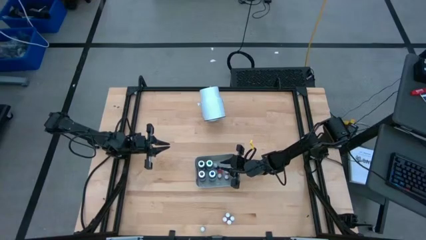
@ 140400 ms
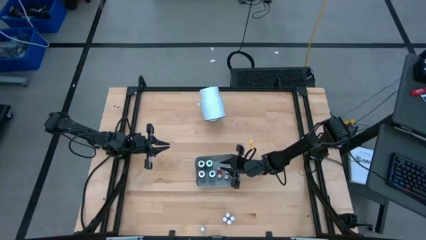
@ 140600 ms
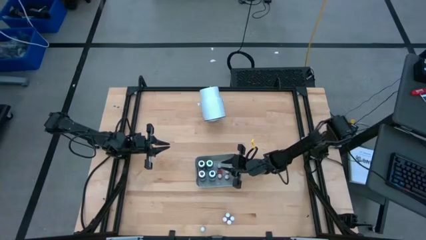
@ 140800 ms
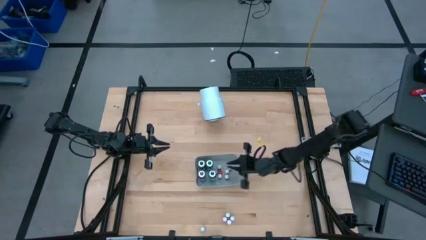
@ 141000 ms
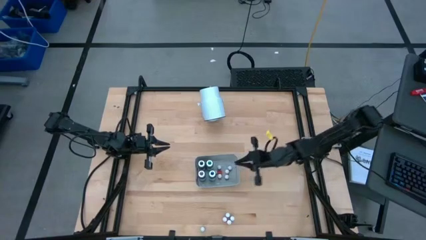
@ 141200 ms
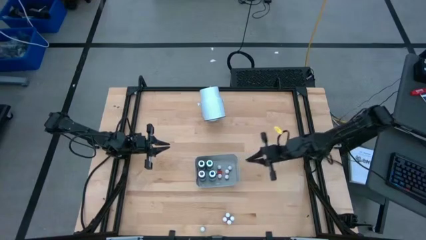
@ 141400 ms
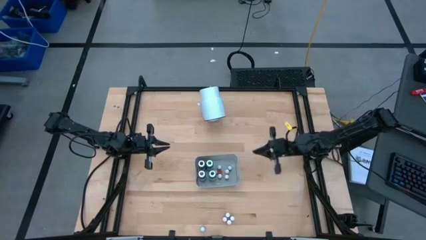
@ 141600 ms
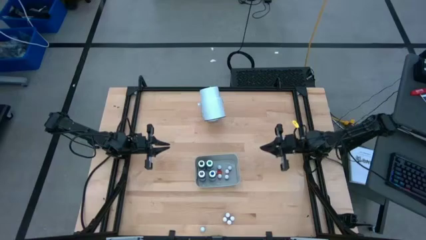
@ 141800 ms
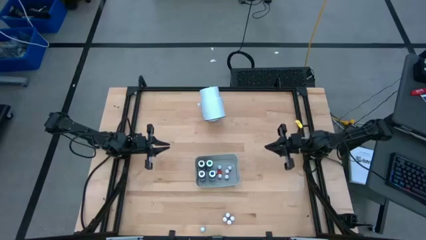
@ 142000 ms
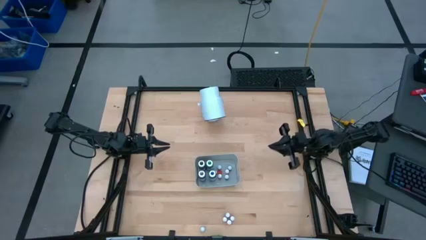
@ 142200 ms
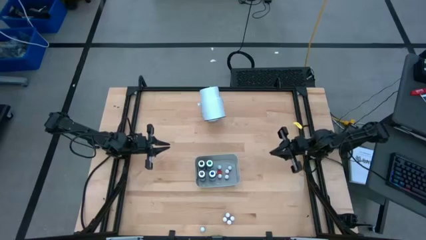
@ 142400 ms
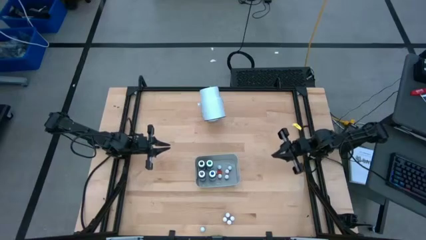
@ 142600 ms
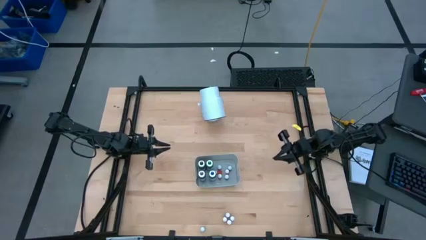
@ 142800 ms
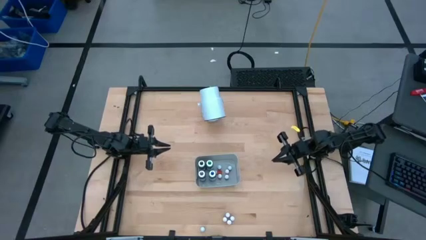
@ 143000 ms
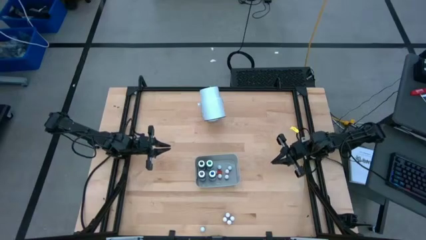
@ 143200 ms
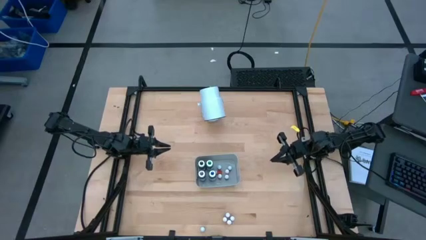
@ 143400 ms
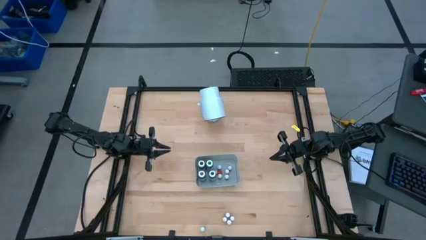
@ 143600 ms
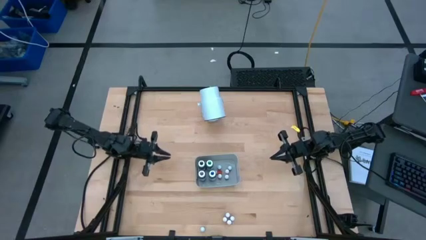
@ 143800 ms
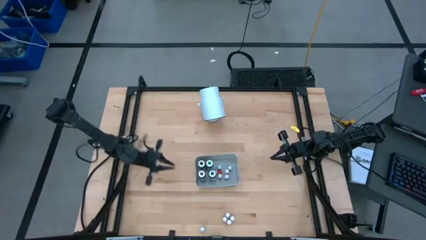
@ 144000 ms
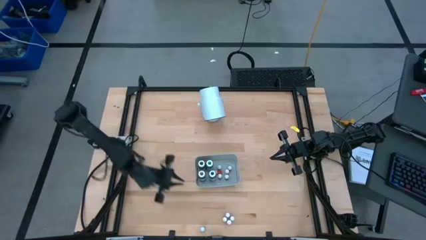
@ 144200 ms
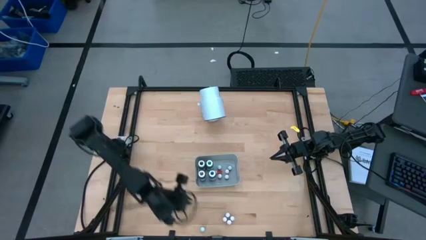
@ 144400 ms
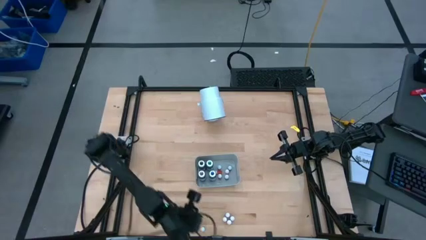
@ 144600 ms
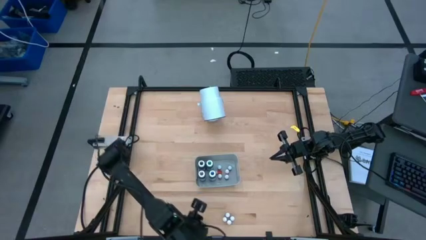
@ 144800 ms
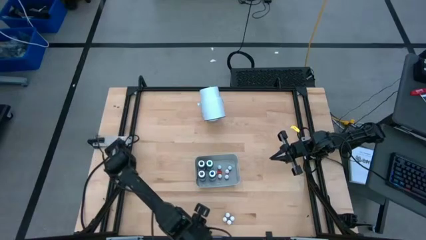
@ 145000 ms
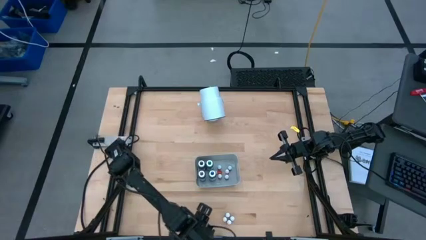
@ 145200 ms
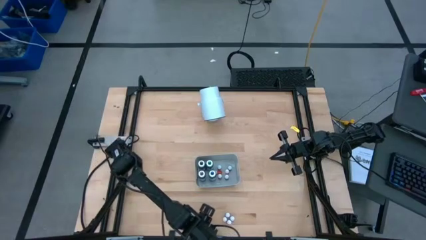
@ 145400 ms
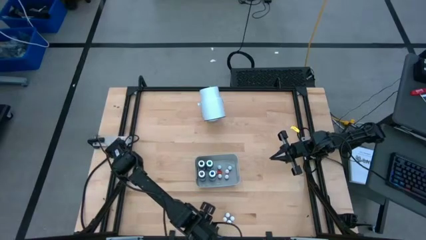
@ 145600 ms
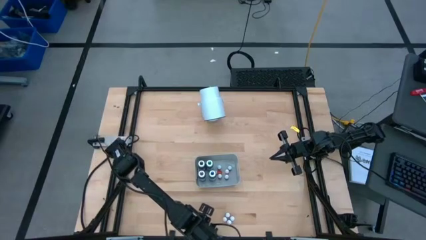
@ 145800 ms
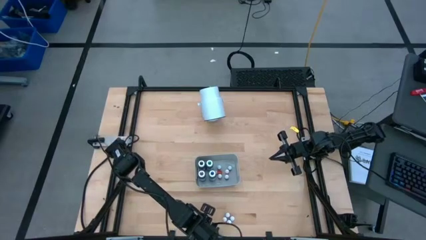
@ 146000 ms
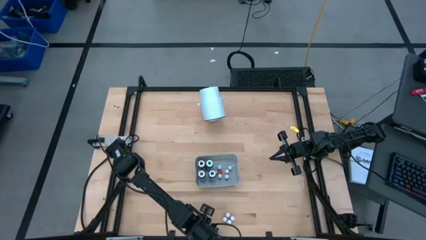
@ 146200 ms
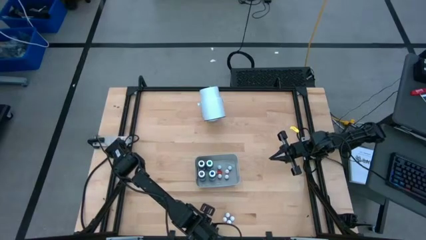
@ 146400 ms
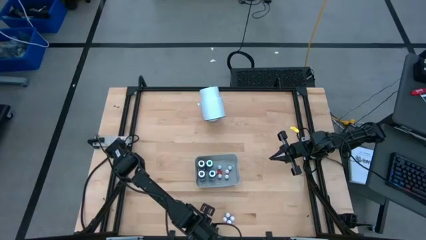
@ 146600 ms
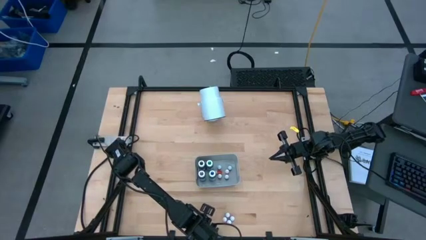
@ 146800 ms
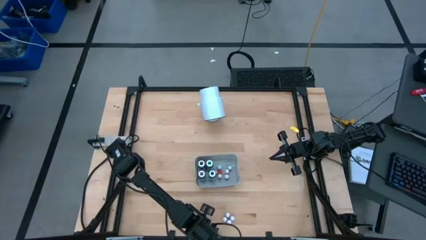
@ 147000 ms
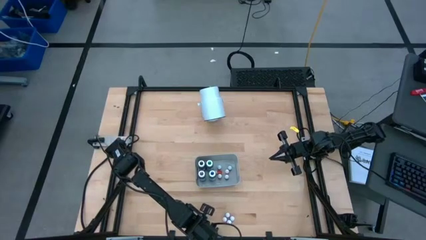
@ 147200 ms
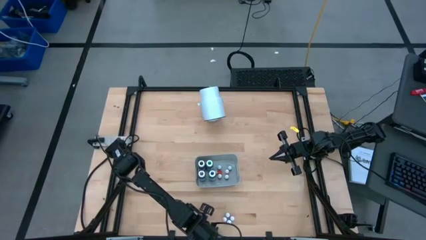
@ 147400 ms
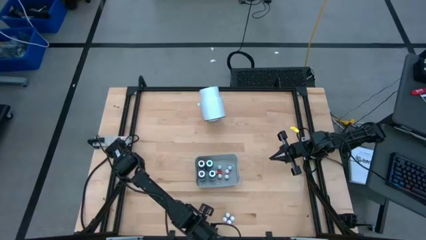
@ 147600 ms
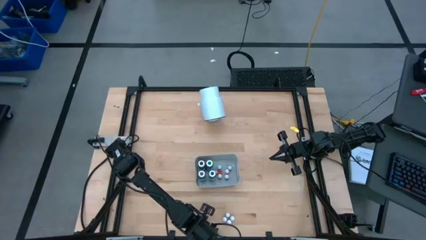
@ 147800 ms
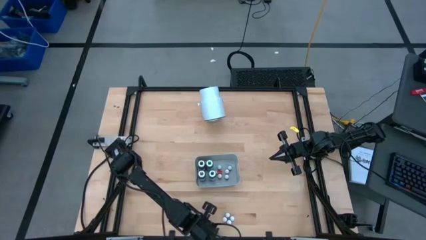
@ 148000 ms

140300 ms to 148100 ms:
Task: Pick & Place food coloring
Put the small green food coloring into the gray bin

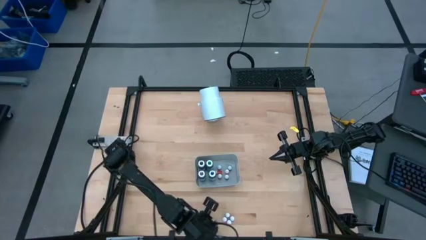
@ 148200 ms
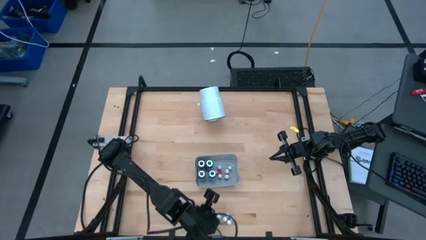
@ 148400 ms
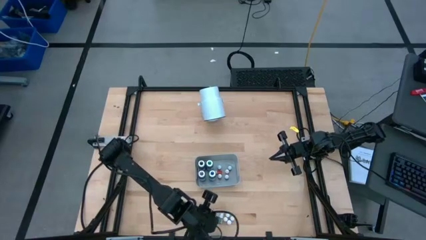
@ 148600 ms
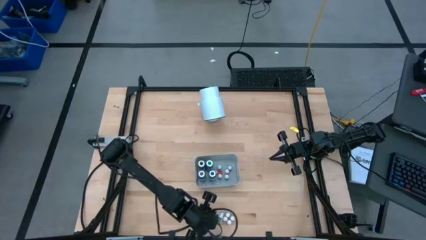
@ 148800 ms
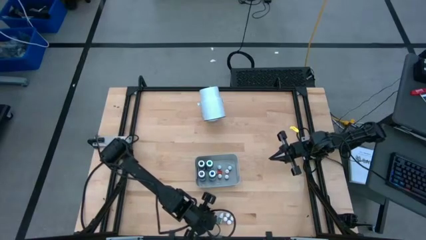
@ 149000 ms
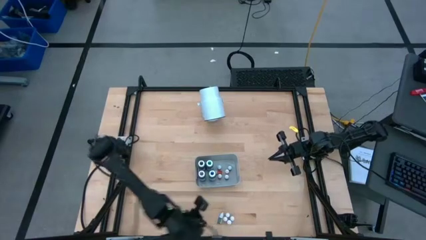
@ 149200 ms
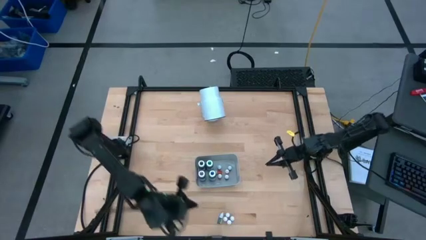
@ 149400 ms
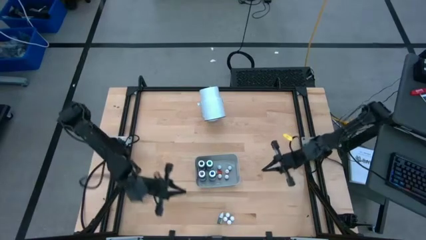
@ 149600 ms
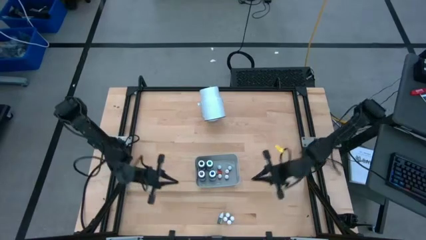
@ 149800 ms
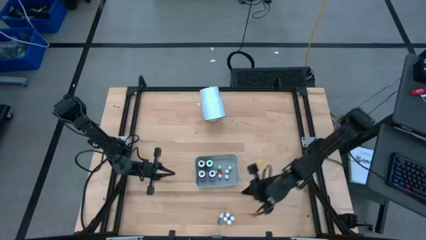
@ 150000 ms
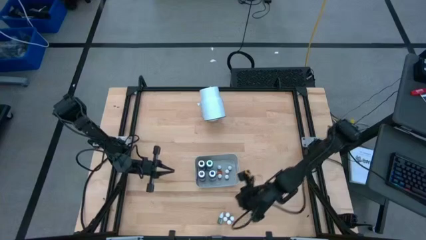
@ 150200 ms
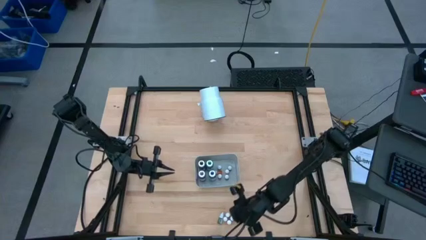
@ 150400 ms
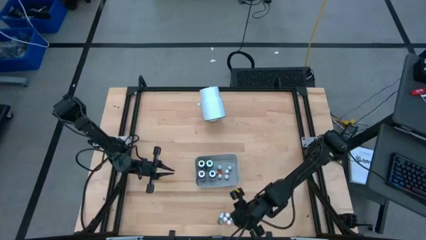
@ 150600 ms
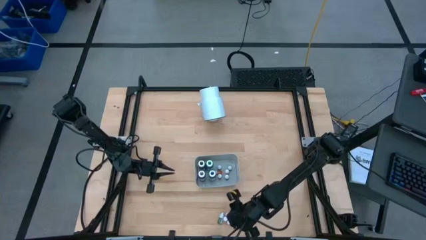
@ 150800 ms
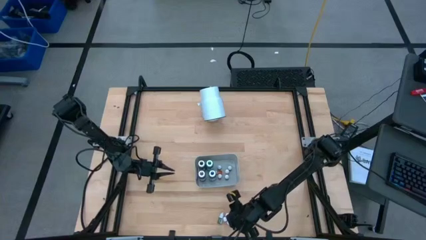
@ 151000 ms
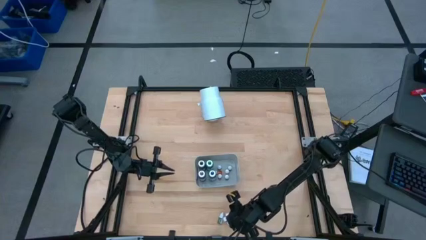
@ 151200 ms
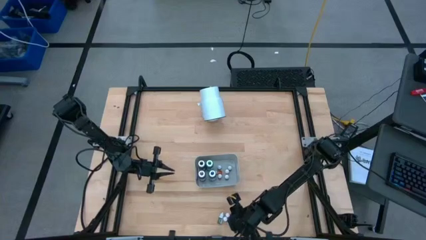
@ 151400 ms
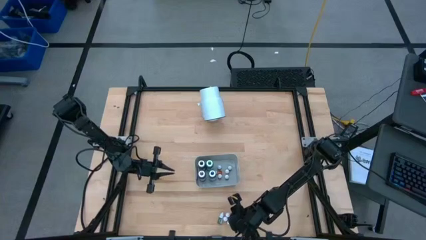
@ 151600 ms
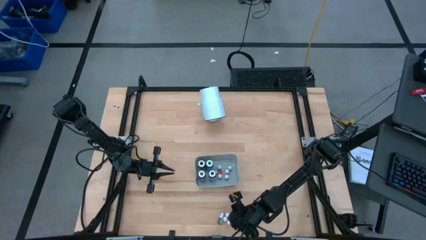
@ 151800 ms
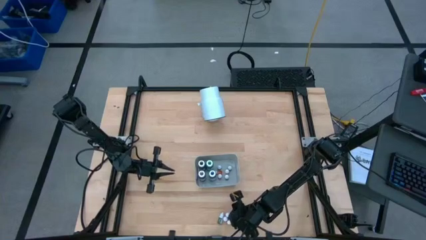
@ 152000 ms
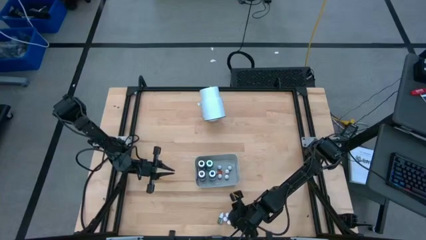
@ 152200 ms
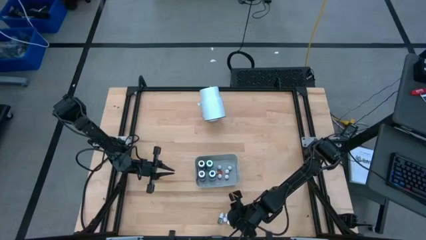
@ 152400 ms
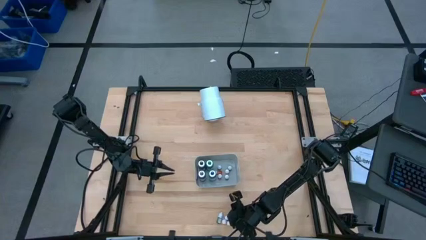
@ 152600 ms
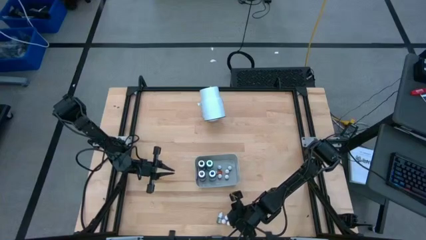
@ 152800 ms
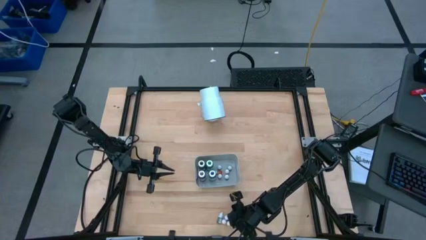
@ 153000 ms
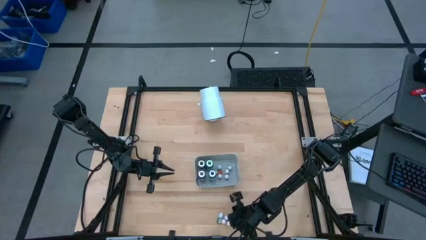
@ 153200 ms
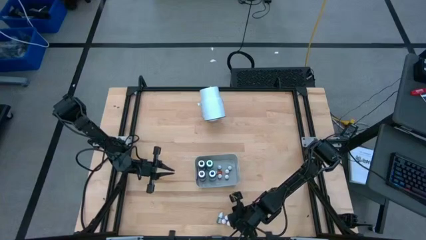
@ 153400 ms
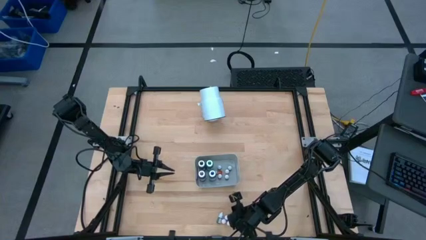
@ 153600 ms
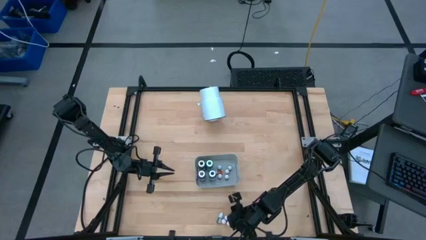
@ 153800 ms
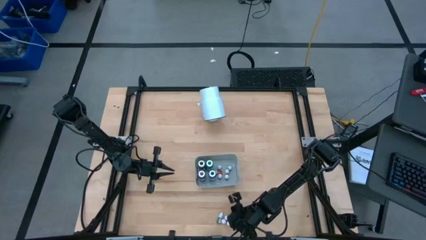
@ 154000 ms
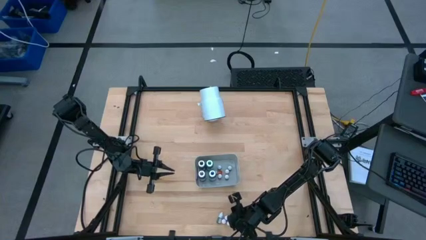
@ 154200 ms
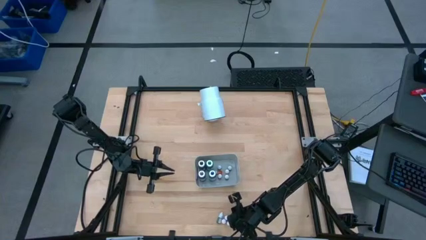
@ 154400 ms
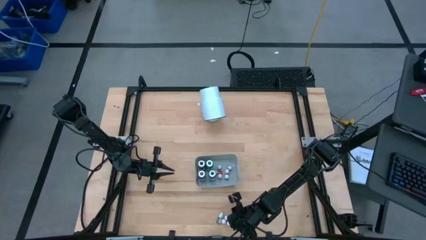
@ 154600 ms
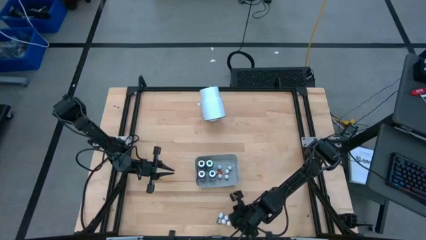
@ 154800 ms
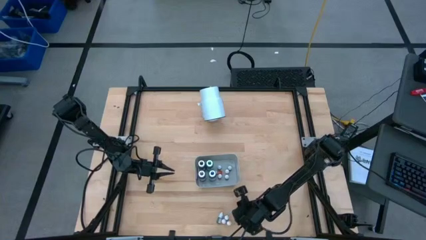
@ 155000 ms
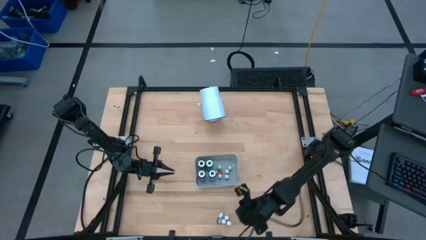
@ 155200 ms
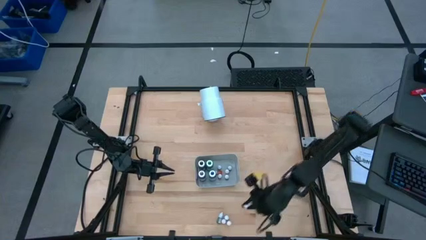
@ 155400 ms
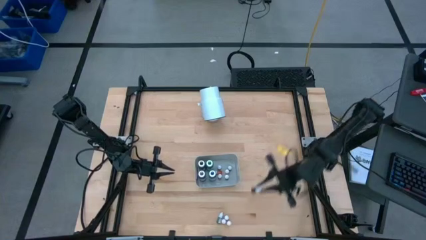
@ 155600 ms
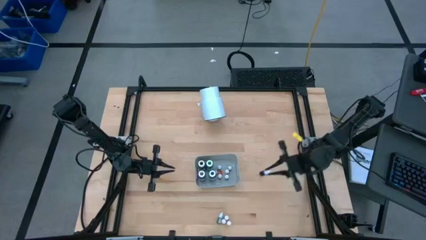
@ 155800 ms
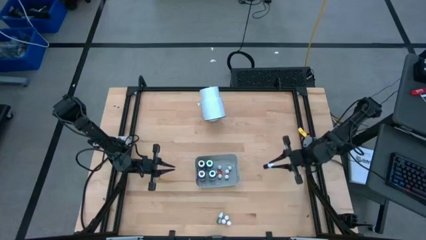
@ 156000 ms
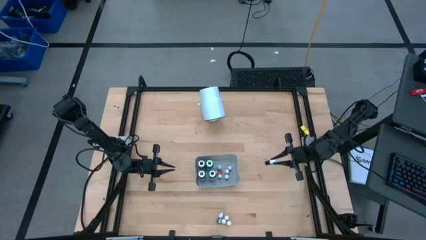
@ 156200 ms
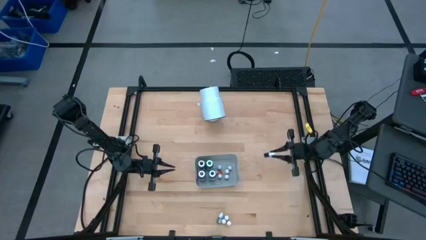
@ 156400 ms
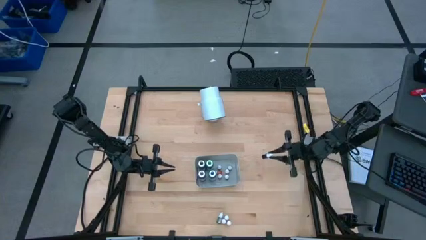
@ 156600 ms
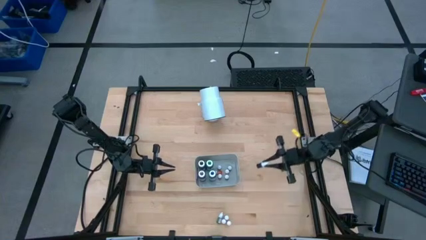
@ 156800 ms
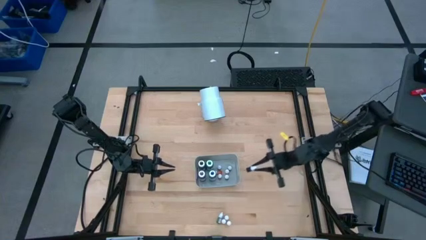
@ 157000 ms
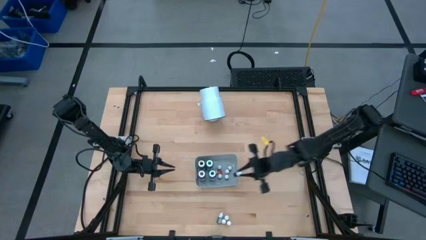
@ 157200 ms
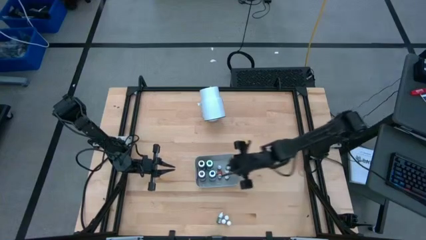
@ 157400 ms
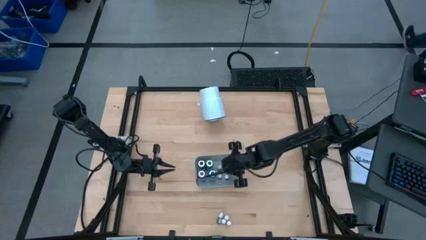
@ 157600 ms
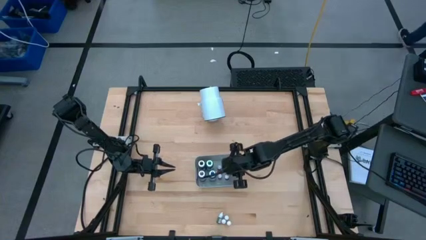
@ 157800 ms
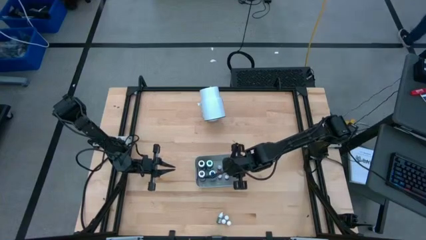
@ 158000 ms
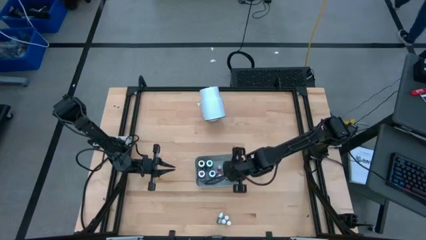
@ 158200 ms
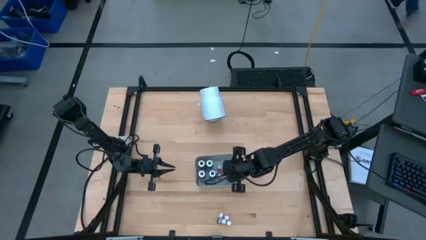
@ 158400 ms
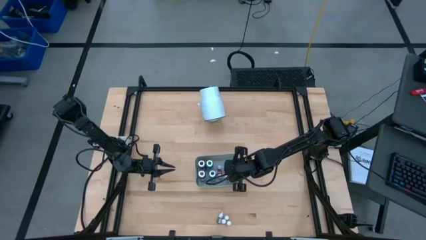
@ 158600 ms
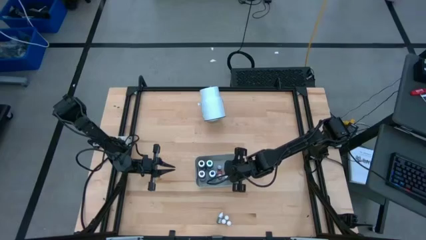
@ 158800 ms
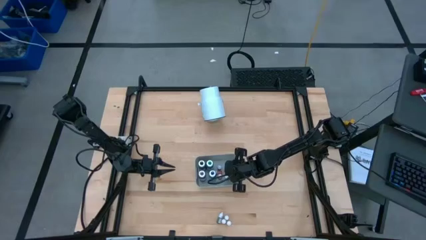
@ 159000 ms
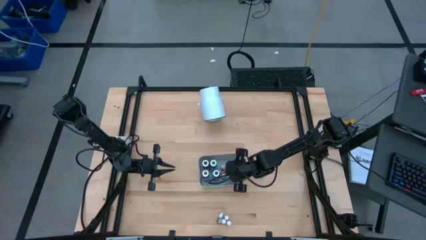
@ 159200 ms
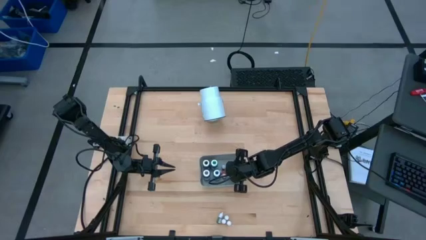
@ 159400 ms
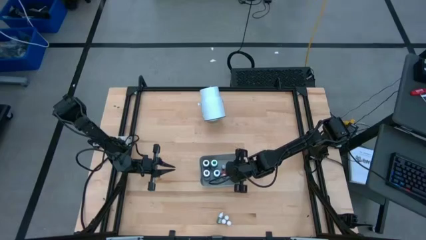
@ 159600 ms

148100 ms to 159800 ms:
Put the small violet food coloring into the gray bin
